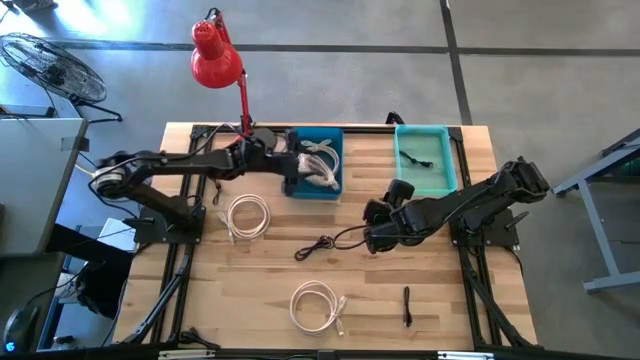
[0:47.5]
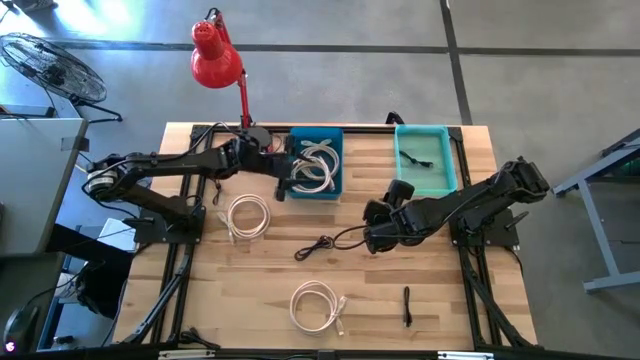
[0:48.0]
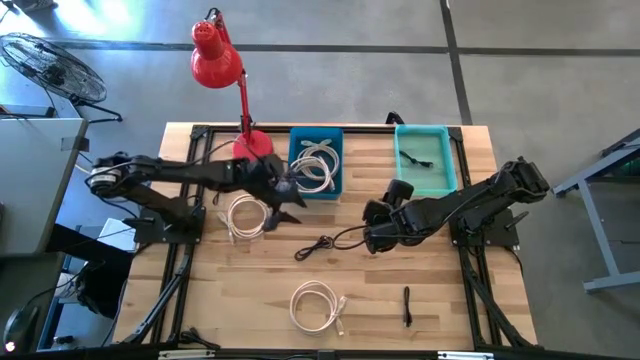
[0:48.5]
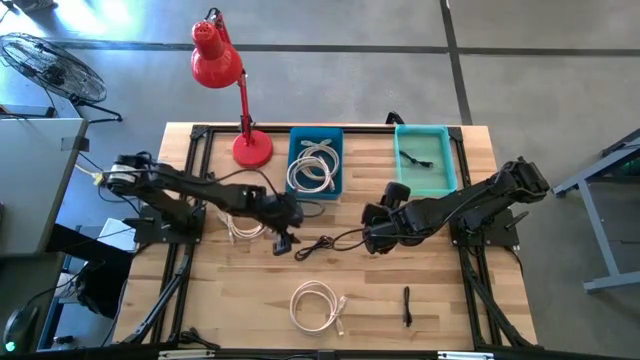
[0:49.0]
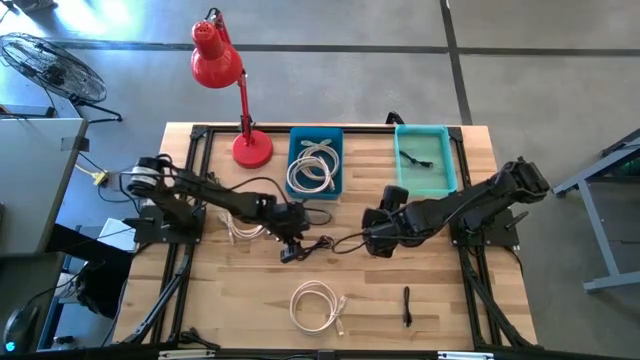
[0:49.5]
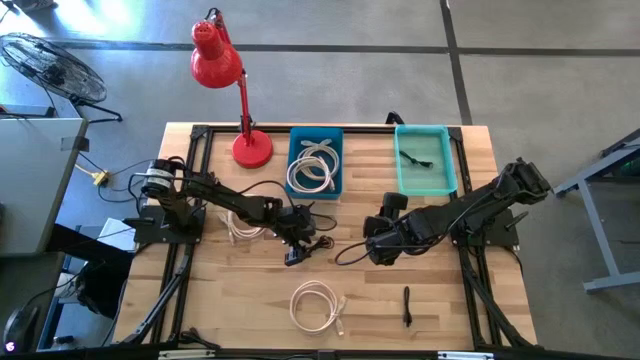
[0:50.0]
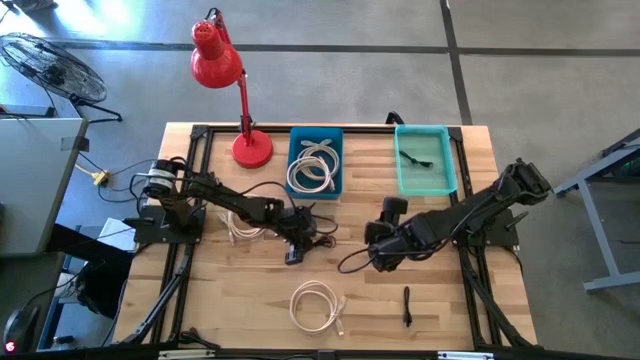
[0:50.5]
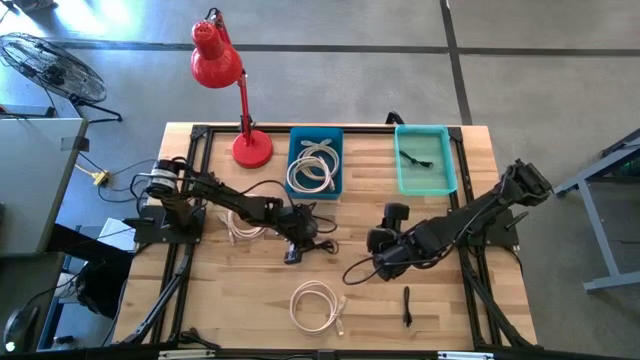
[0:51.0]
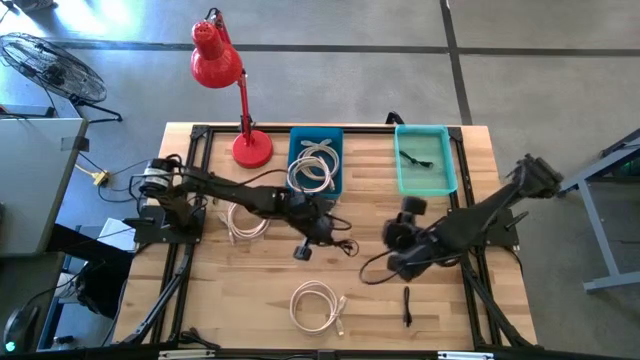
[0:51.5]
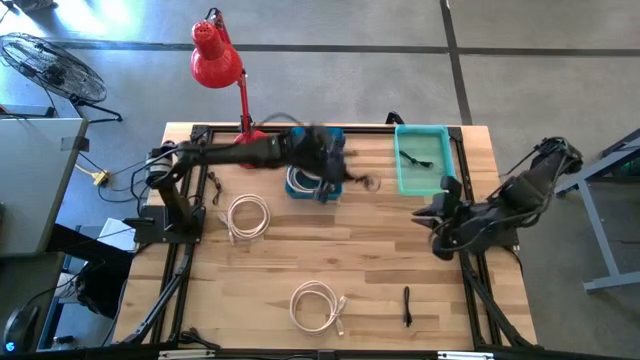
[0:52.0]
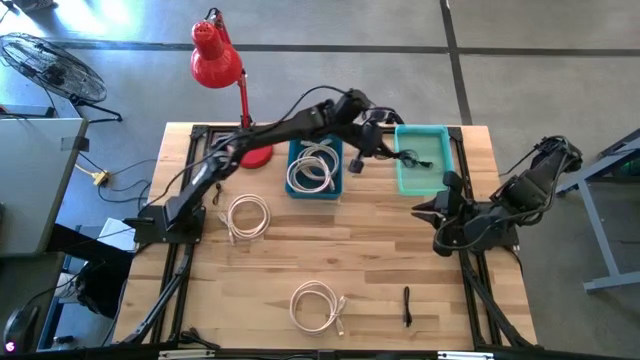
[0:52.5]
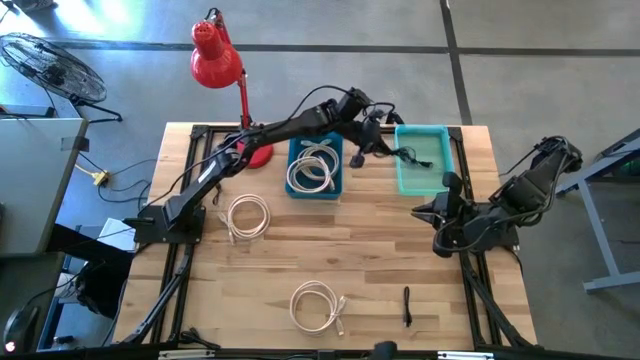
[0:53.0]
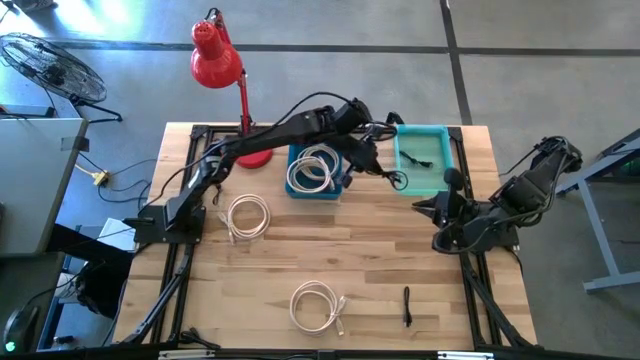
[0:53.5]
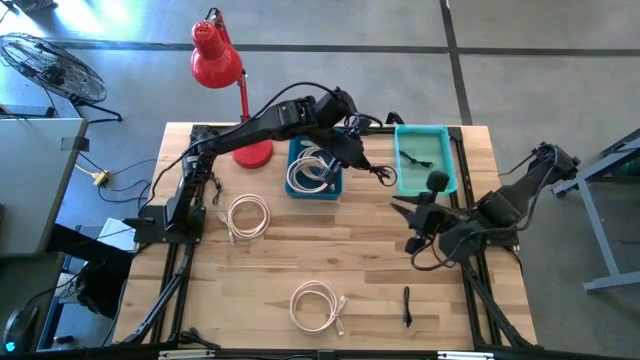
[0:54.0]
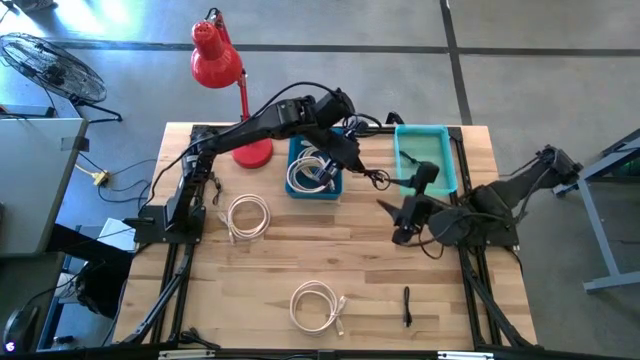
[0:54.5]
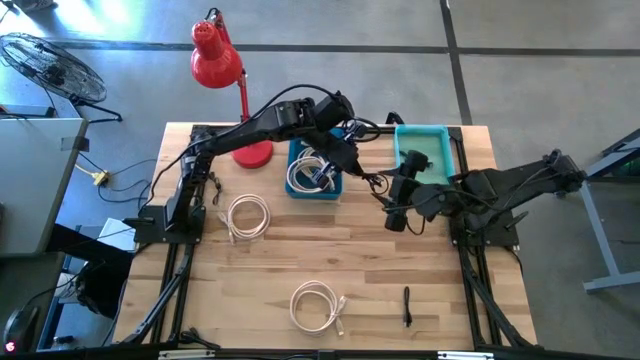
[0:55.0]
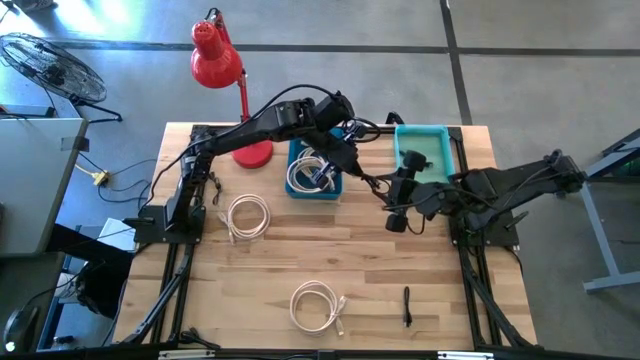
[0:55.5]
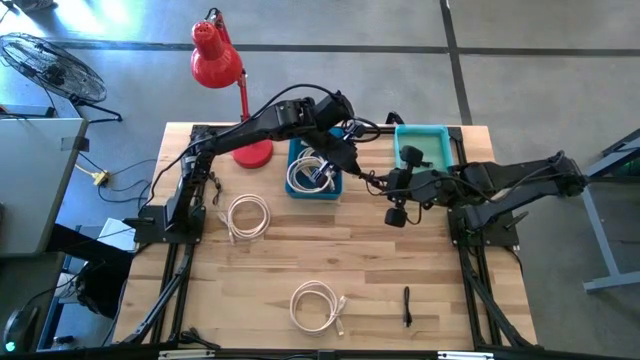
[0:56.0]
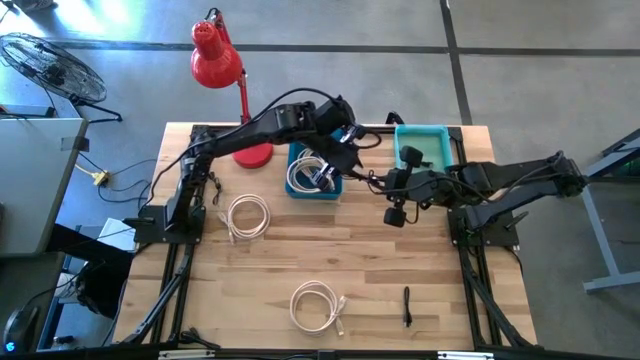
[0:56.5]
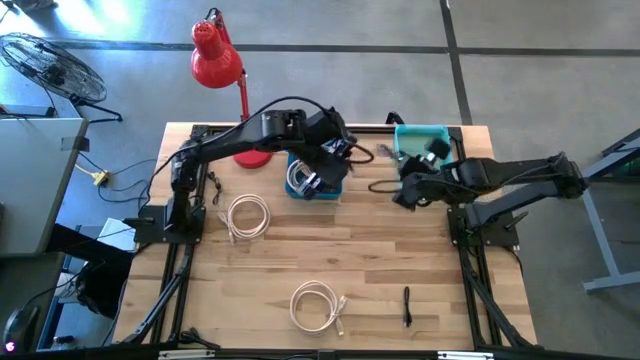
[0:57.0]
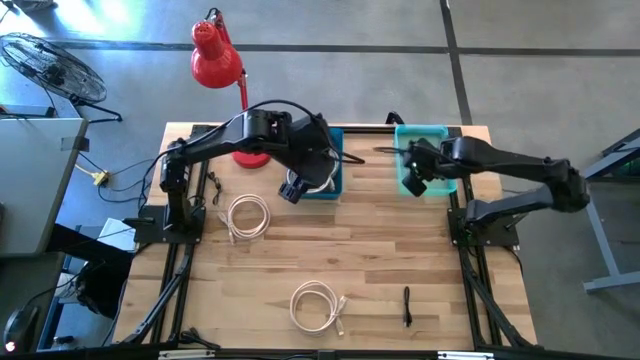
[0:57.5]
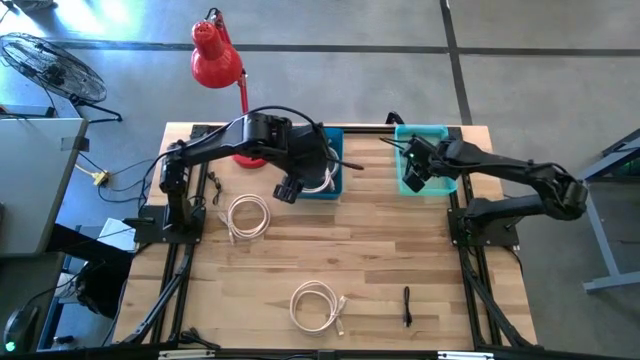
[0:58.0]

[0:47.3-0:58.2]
Task: Pick & Place USB Port
Put the black charger cable in the green bin

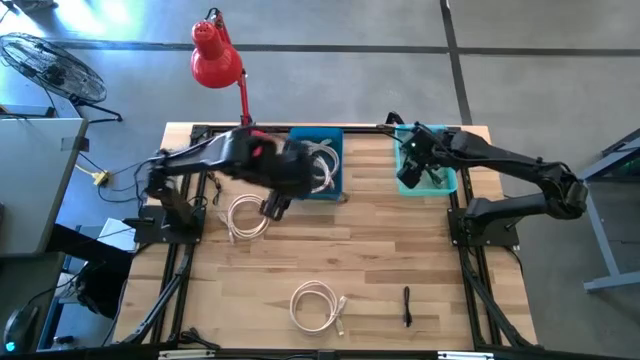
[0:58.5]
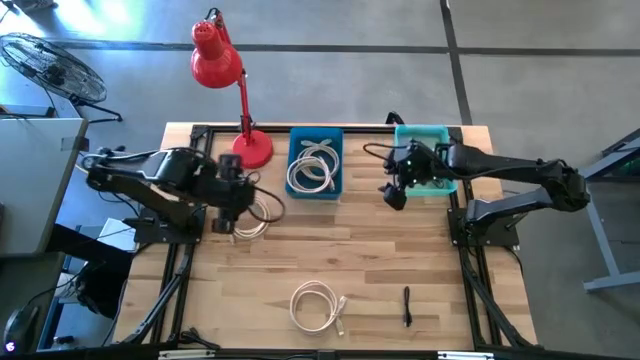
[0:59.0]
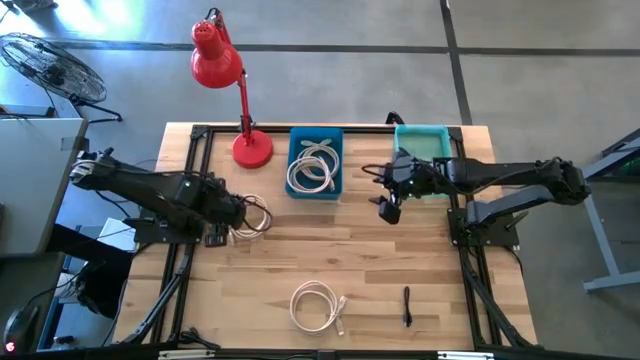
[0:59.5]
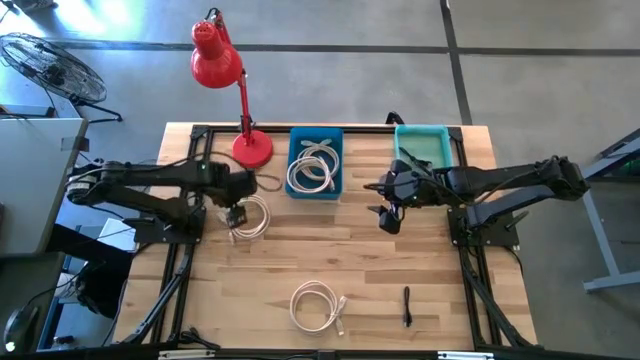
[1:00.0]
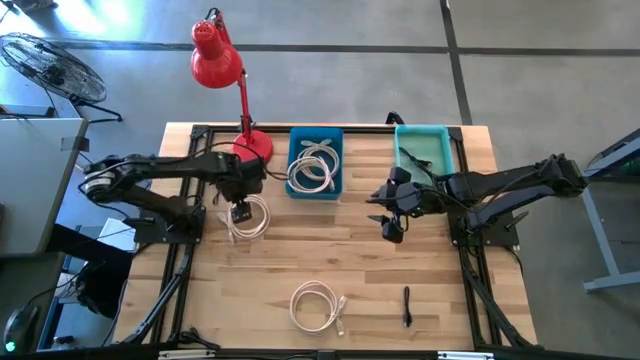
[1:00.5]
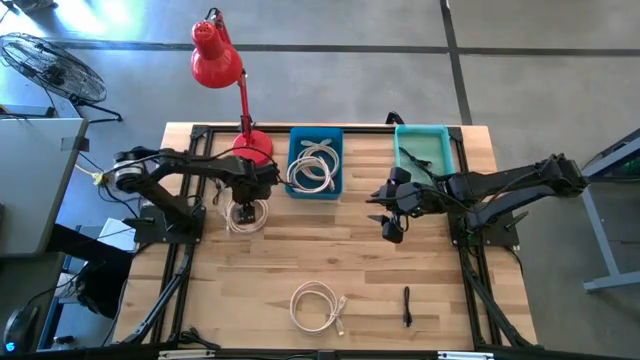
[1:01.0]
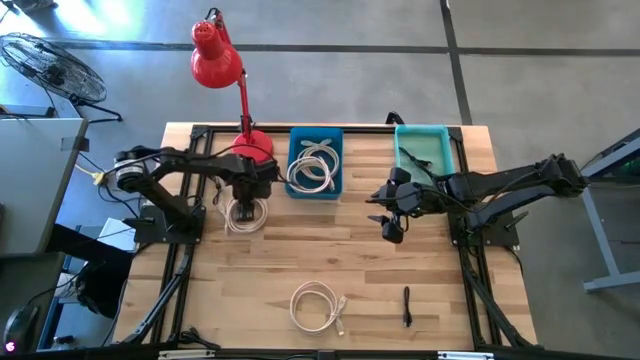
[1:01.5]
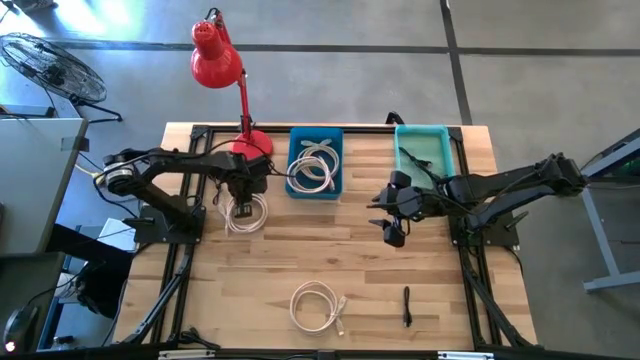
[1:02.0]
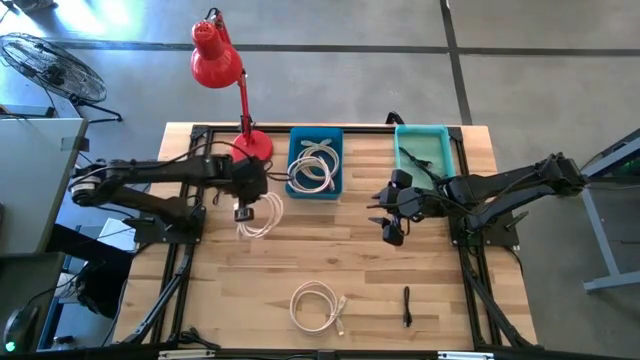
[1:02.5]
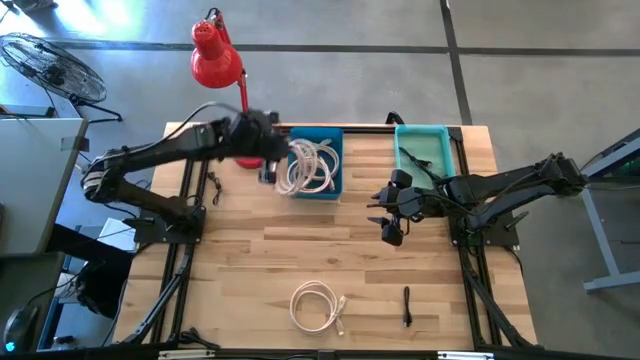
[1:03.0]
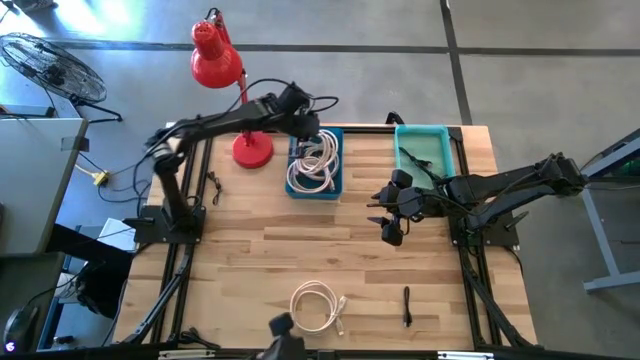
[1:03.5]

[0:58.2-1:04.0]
Put the brown HDMI cable in the blue bin

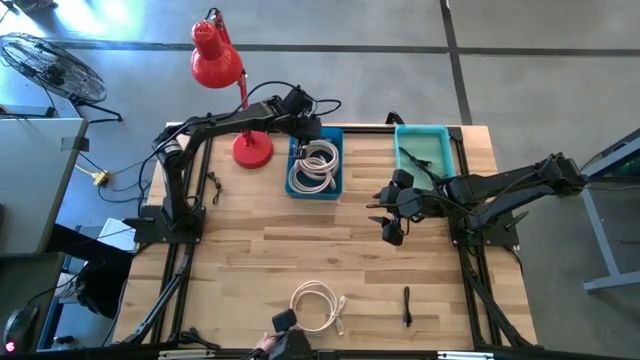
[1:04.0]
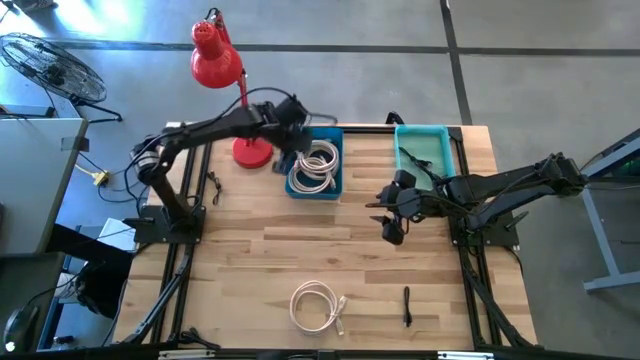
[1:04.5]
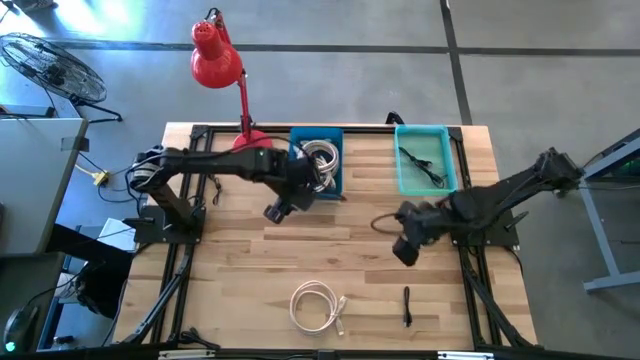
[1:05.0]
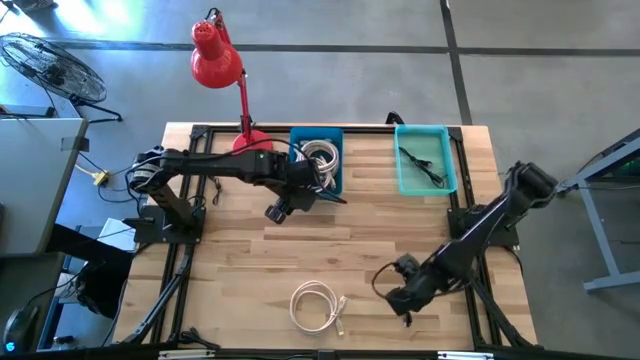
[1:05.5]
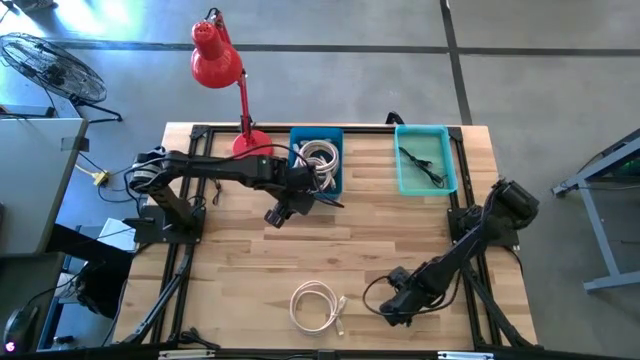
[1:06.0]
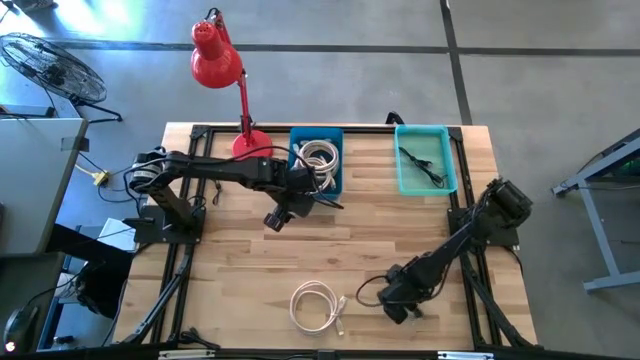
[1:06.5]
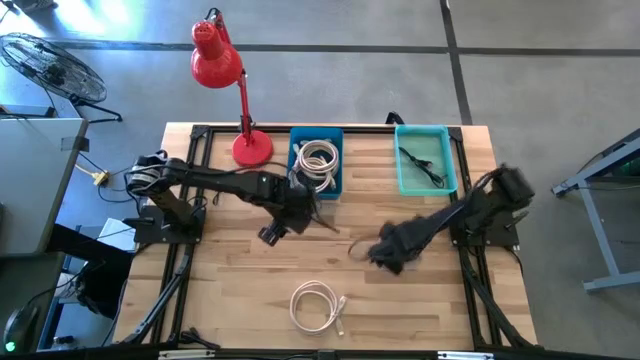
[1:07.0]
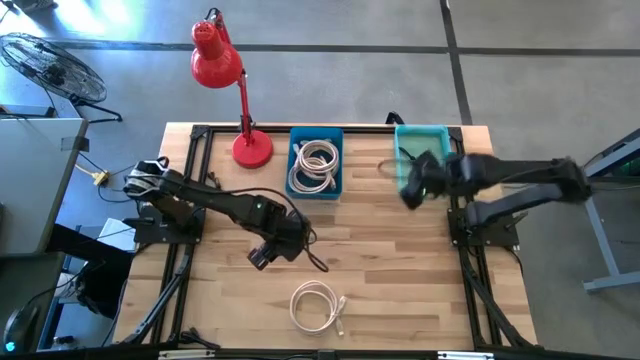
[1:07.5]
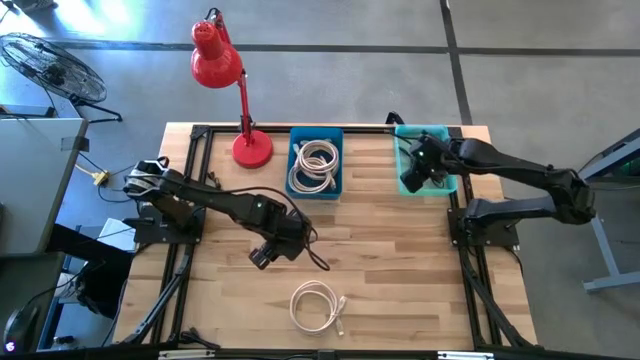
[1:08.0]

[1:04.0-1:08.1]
Put the black charger cable in the green bin

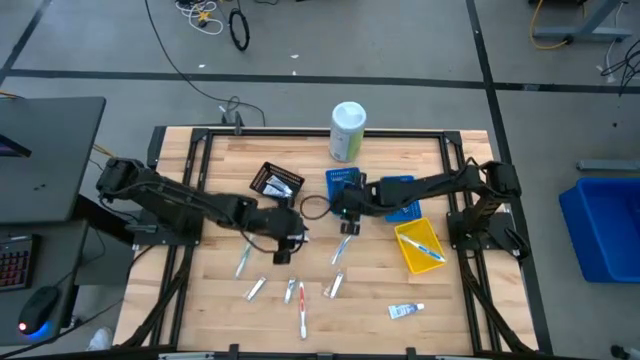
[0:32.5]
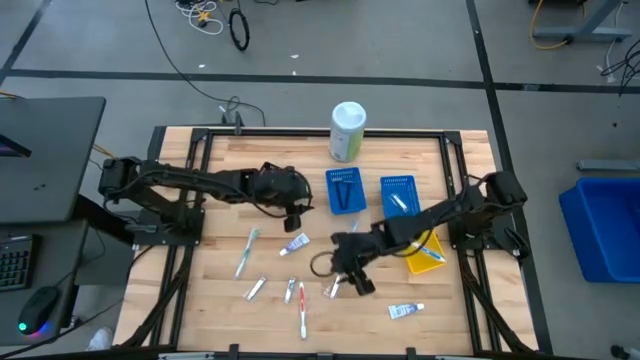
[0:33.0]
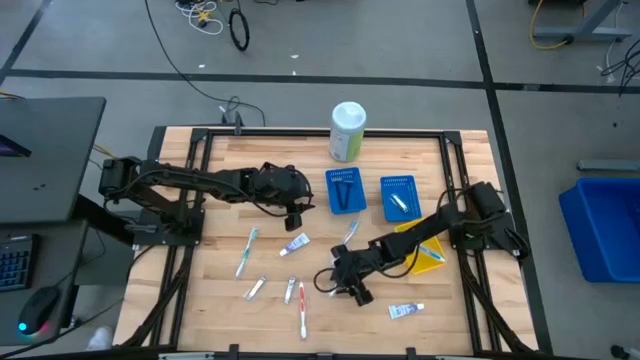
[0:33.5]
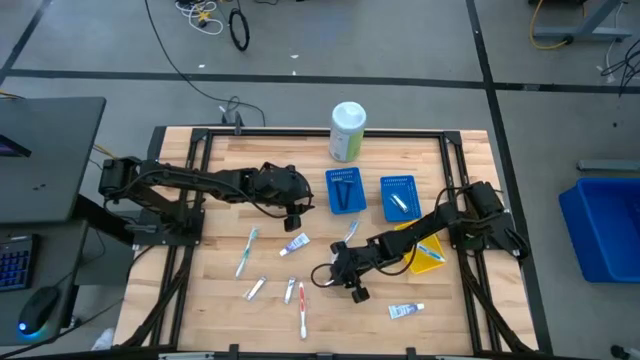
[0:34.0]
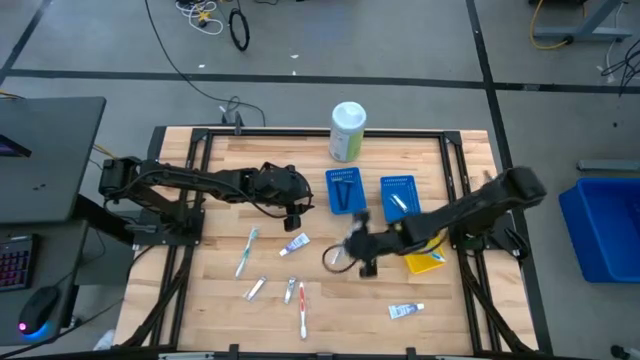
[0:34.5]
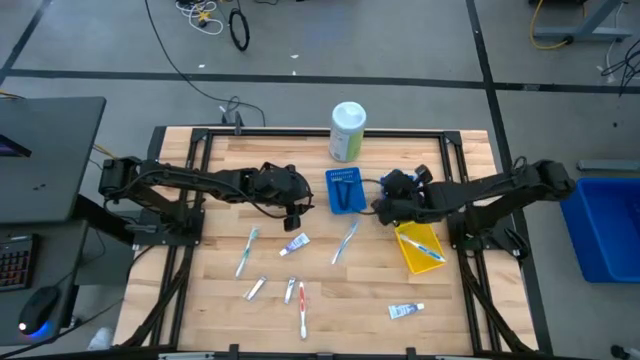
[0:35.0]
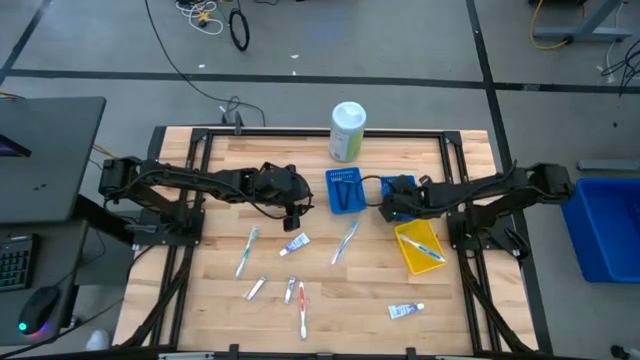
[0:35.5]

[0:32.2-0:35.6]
Task: Pick & Place Travel size toiletries
Put the nail cutter into the right blue basket
